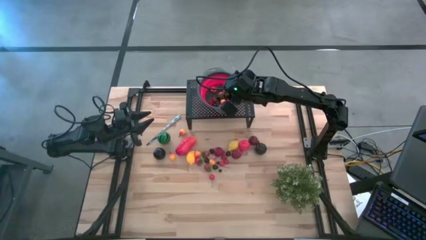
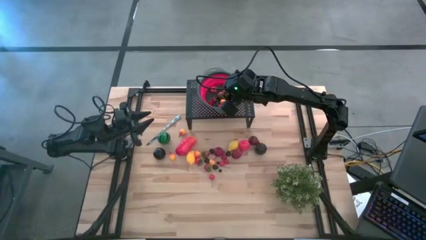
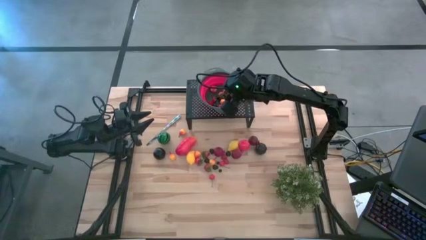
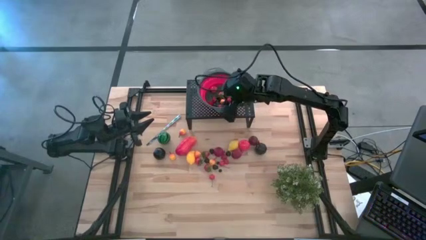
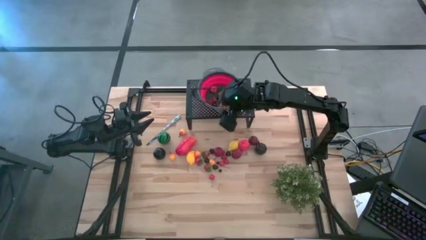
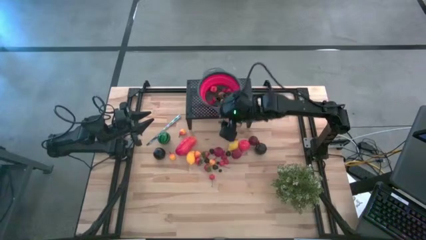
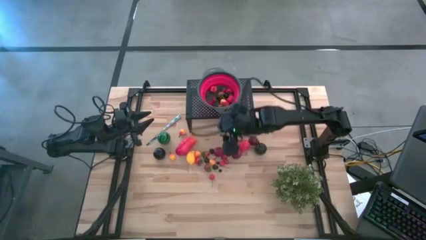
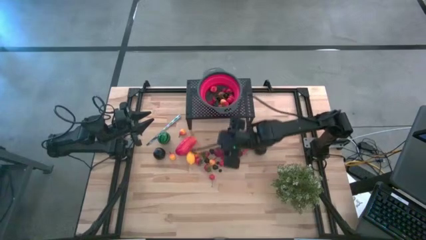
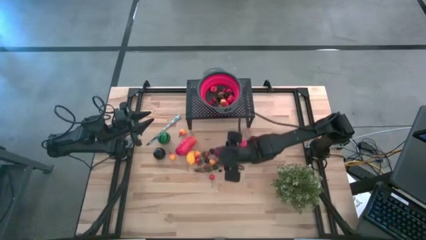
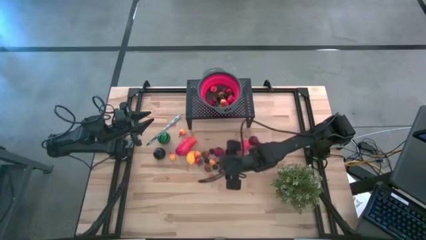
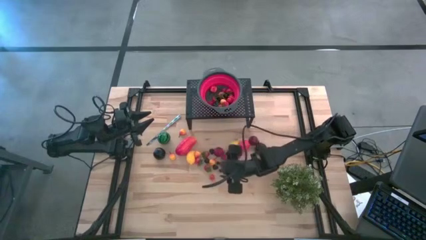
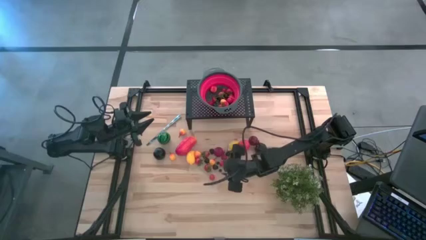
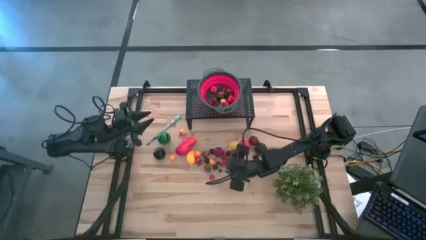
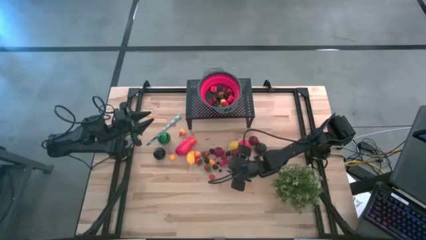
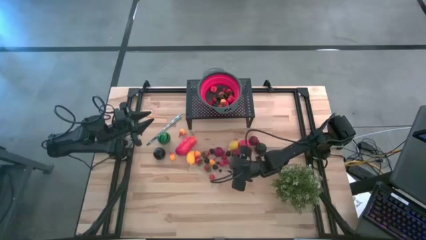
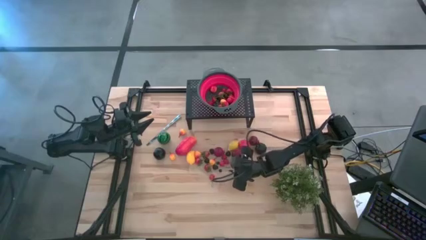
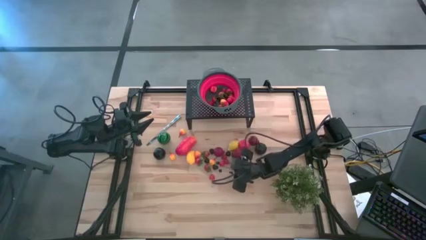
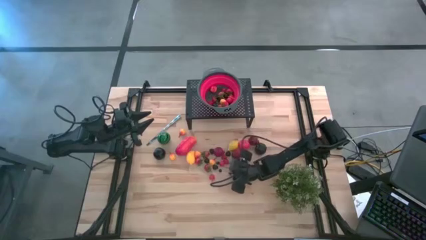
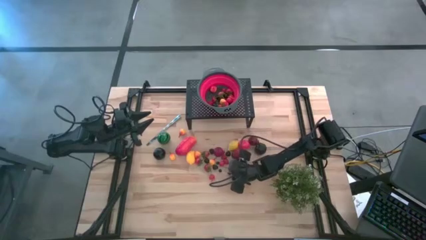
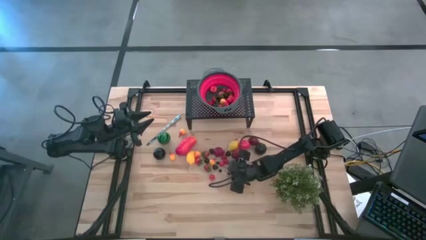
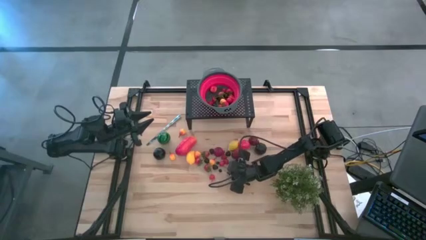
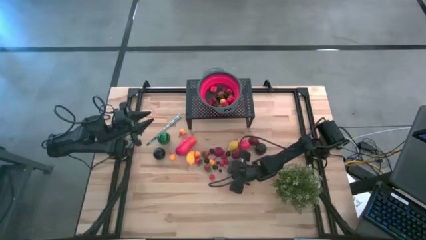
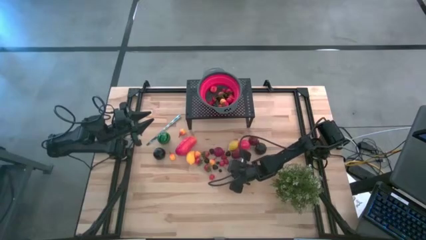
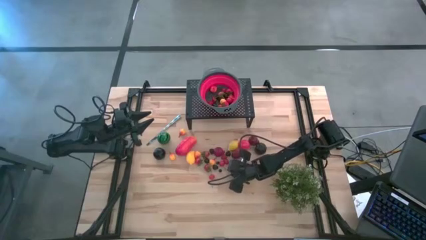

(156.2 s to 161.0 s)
Task: Pick & Place Fruit
Put the red cherry in the red colander on the shelf

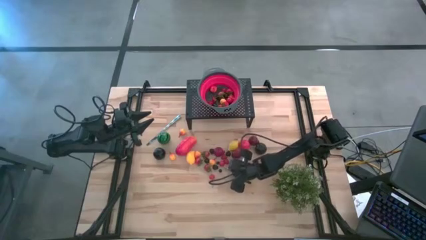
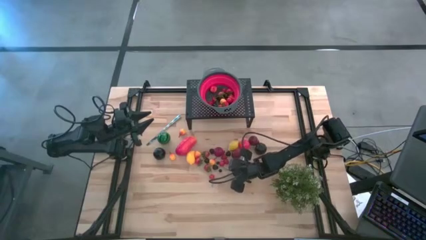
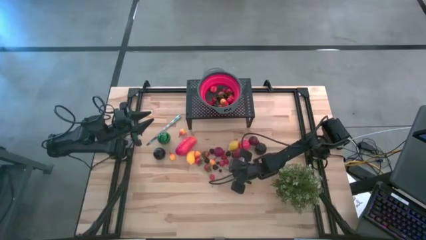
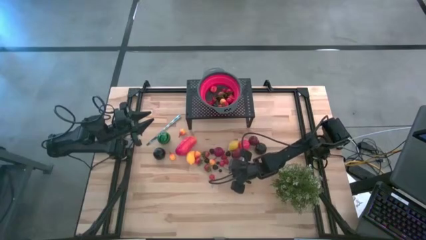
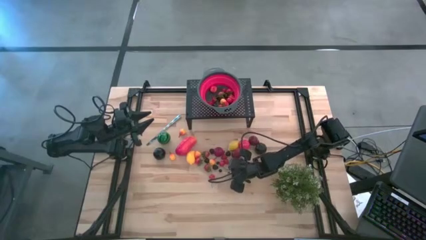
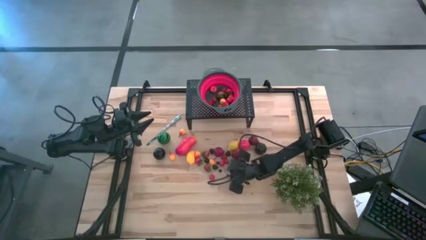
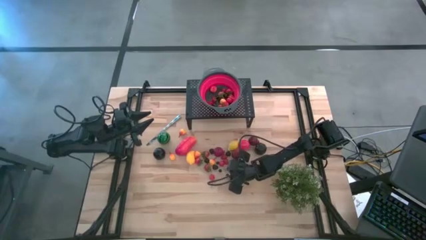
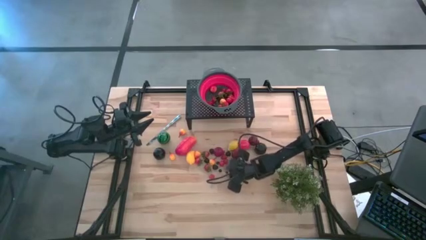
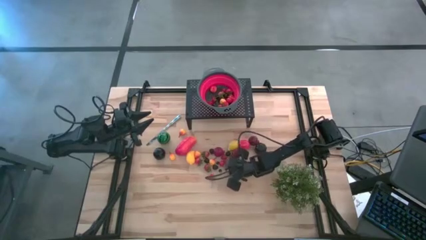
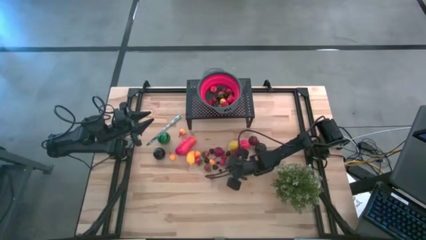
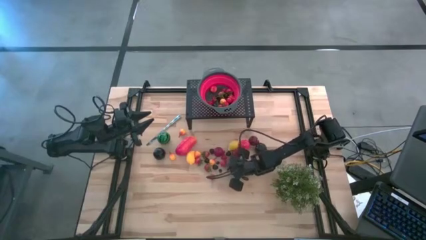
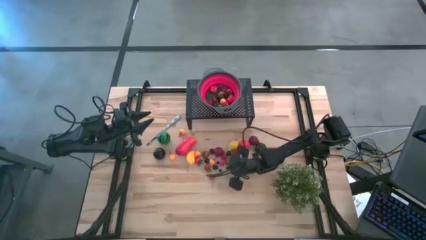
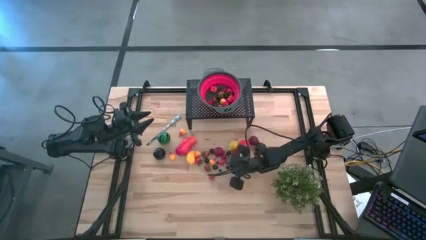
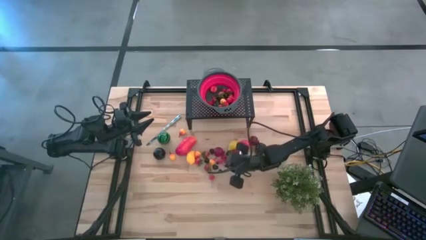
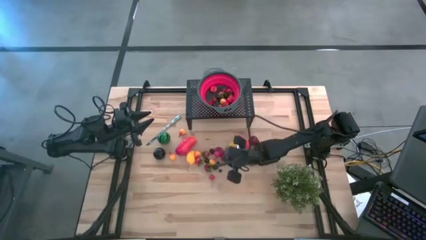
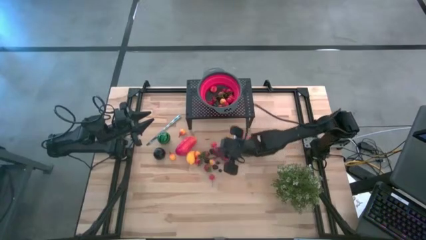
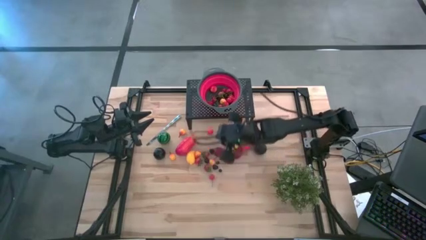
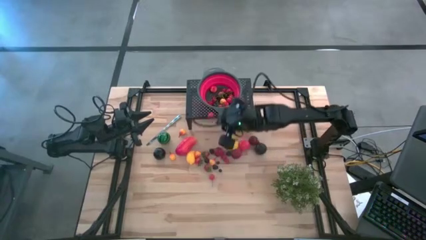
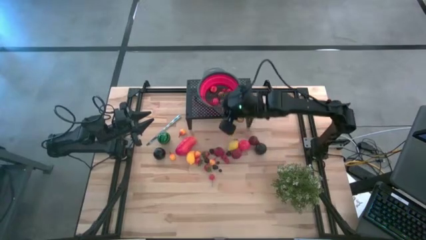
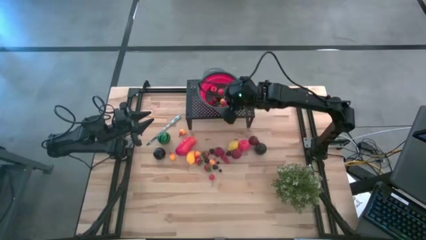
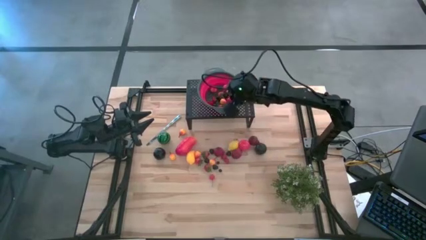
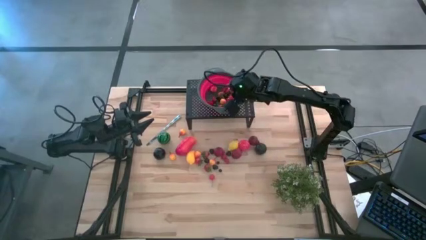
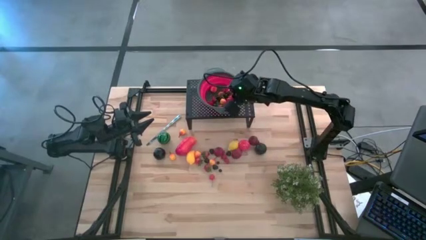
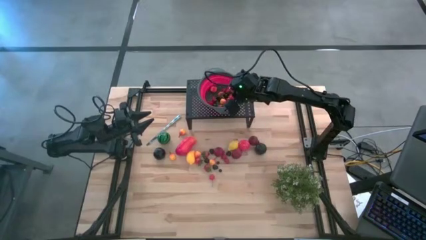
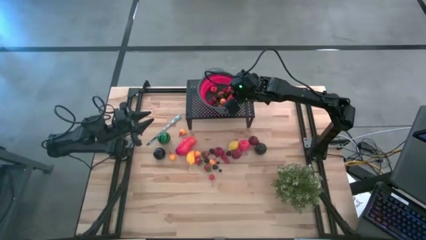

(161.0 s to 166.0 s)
Put the red cherry in the red colander on the shelf

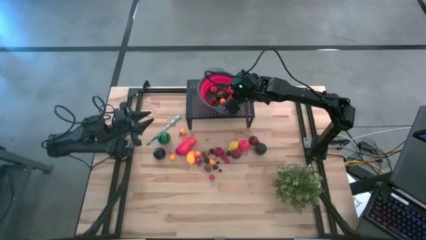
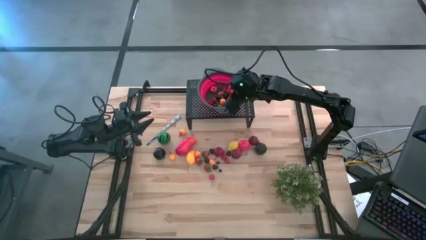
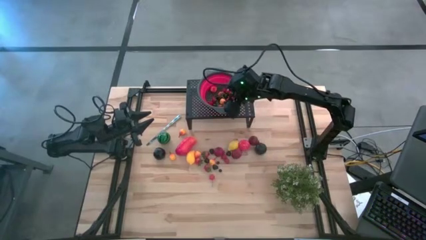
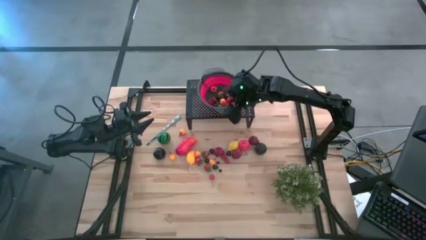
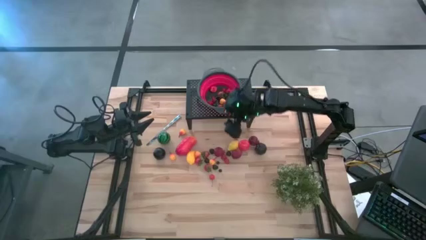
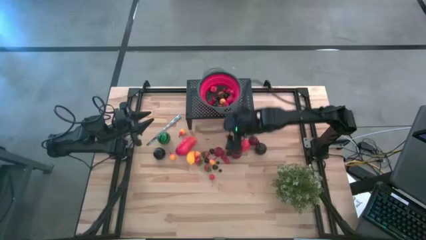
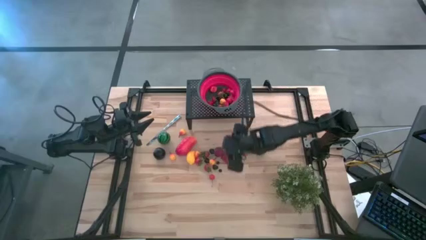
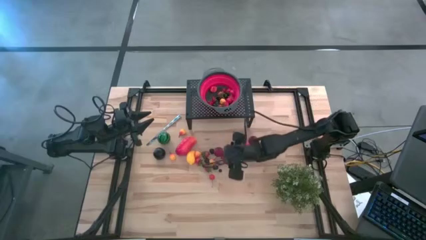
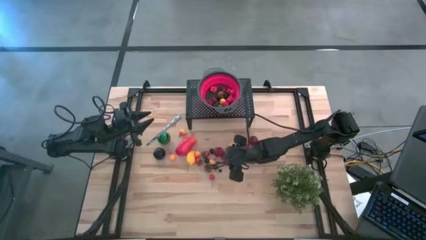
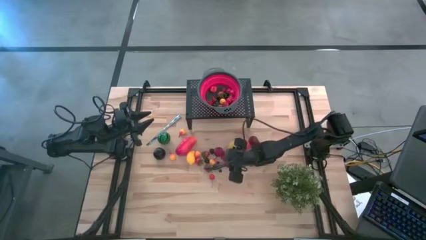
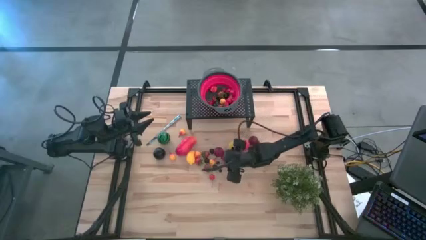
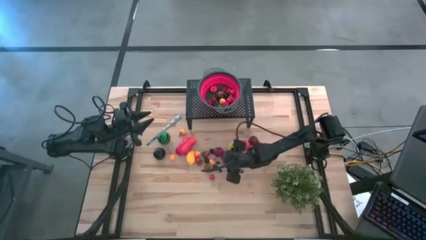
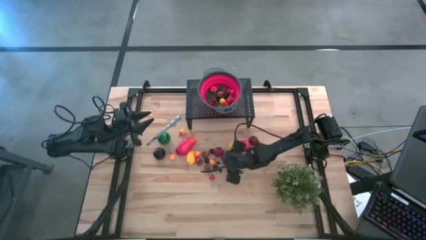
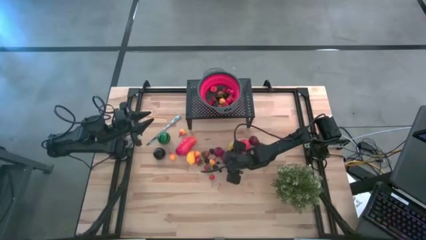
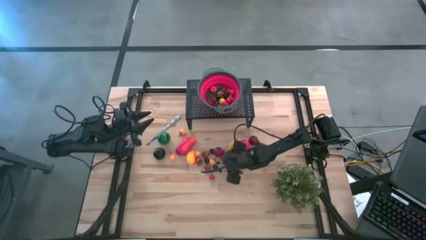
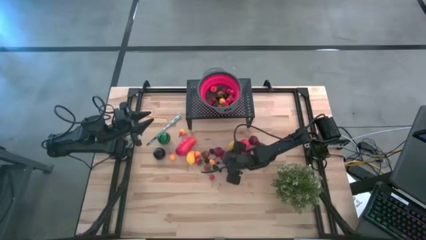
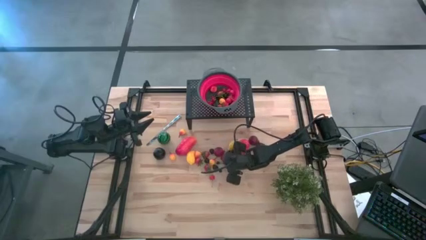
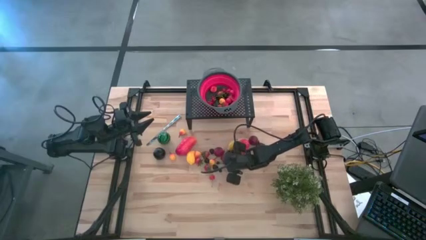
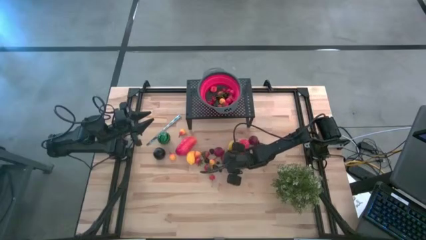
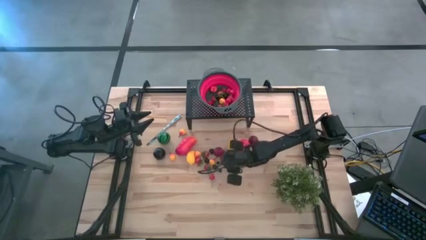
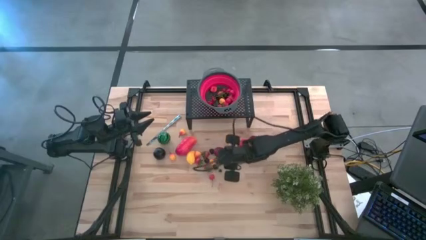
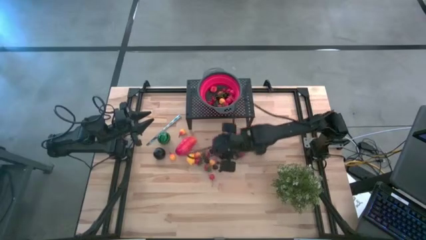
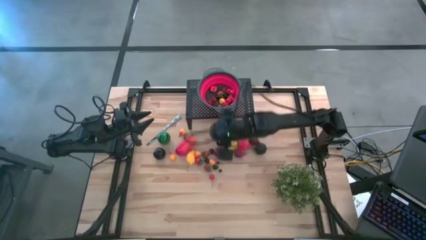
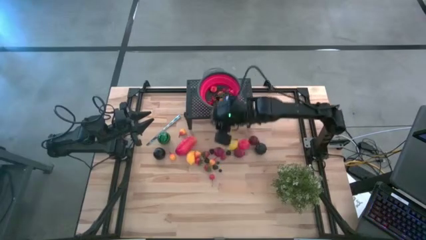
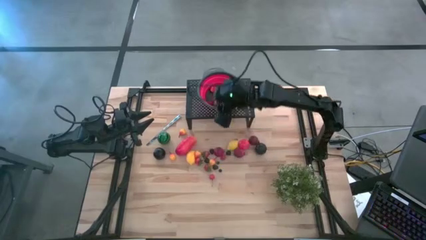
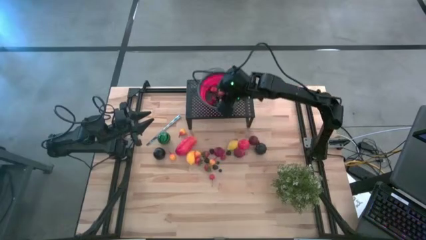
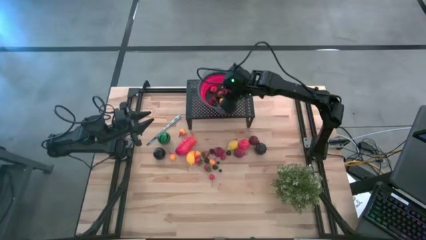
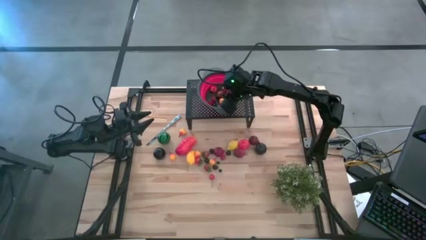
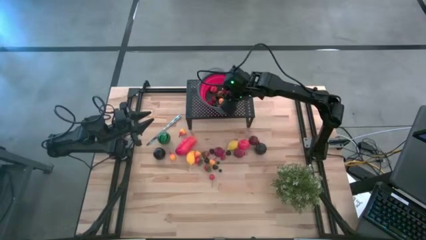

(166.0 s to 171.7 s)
Put the raspberry in the red colander on the shelf
